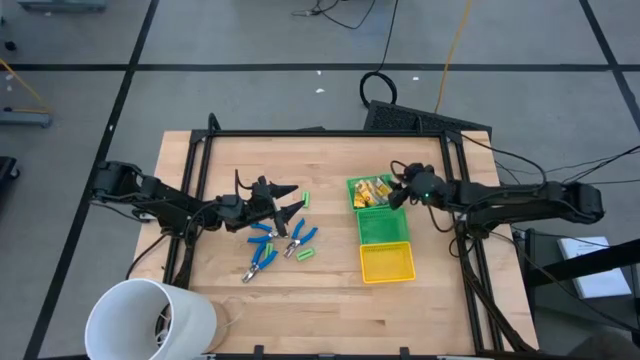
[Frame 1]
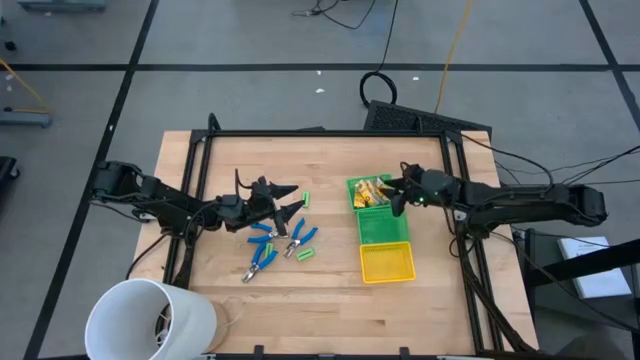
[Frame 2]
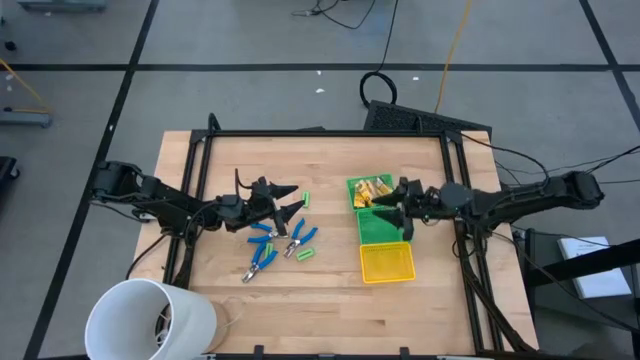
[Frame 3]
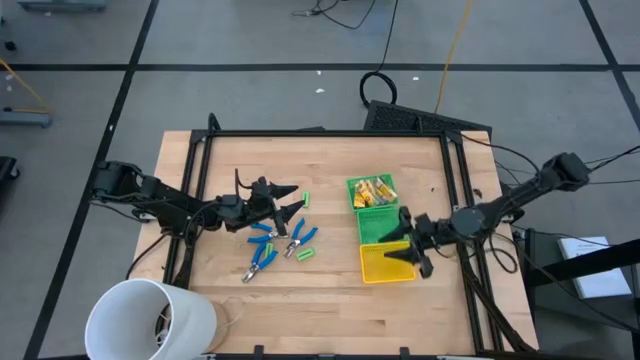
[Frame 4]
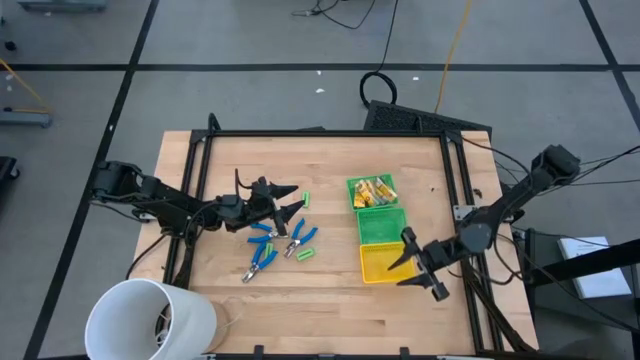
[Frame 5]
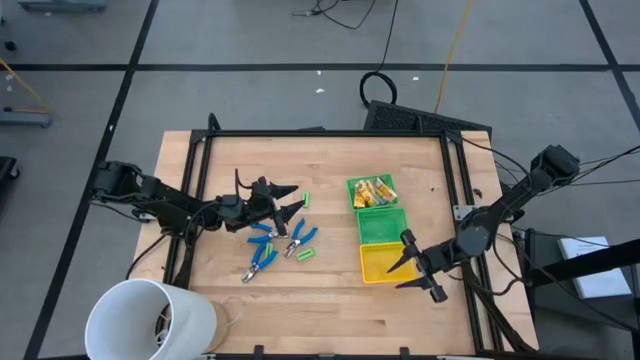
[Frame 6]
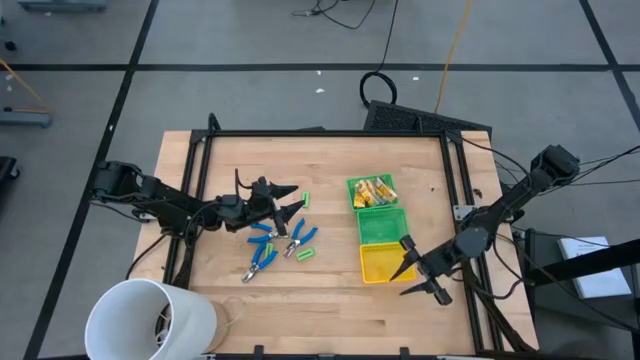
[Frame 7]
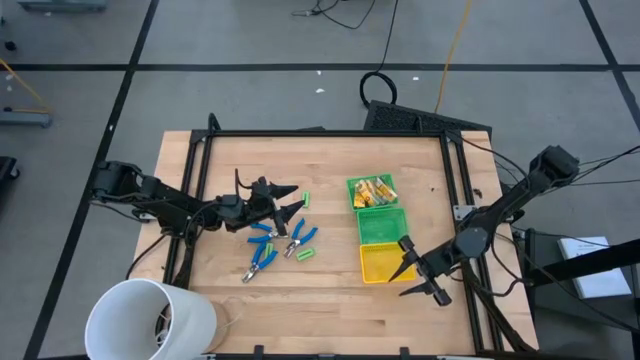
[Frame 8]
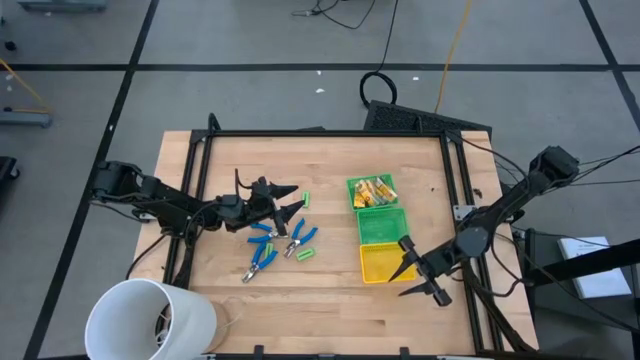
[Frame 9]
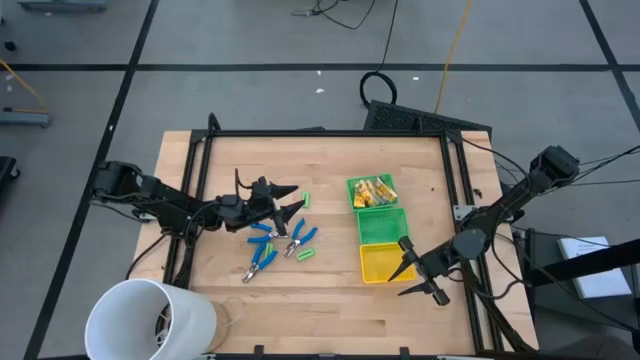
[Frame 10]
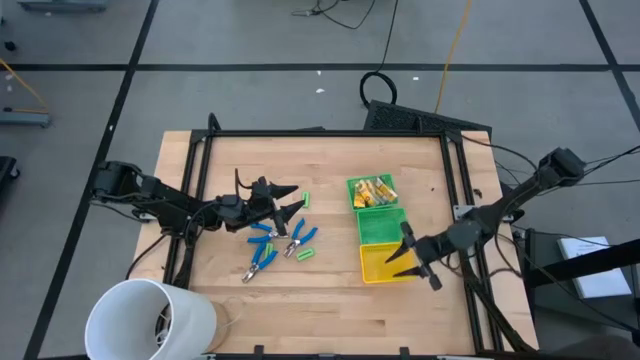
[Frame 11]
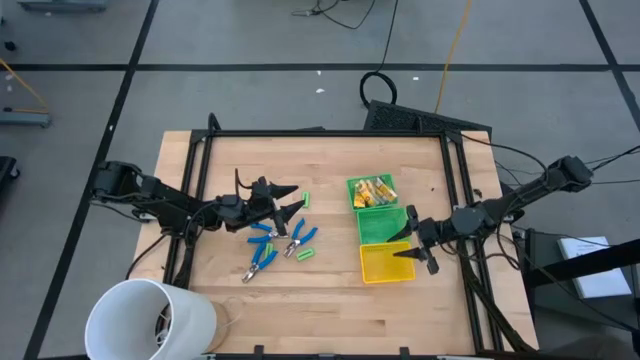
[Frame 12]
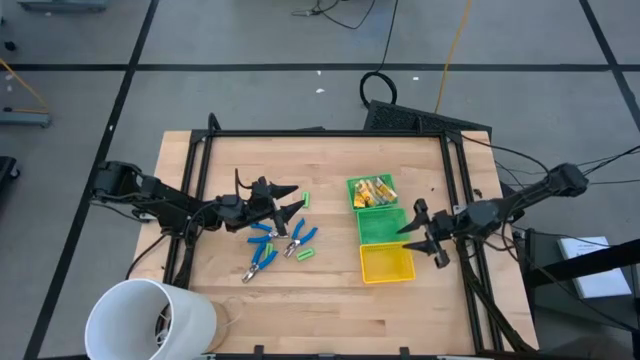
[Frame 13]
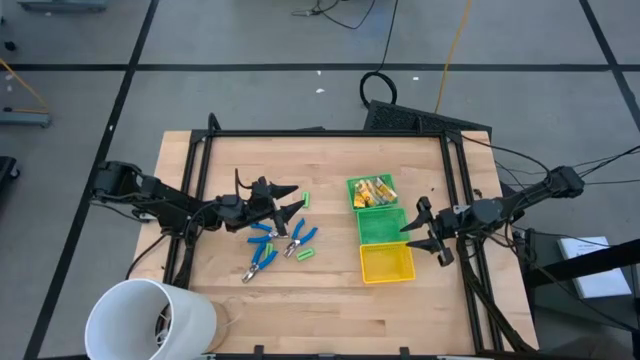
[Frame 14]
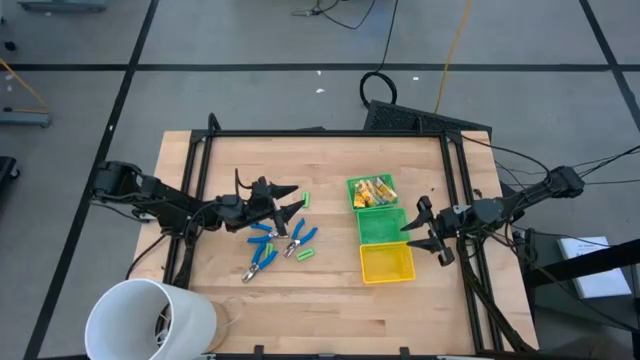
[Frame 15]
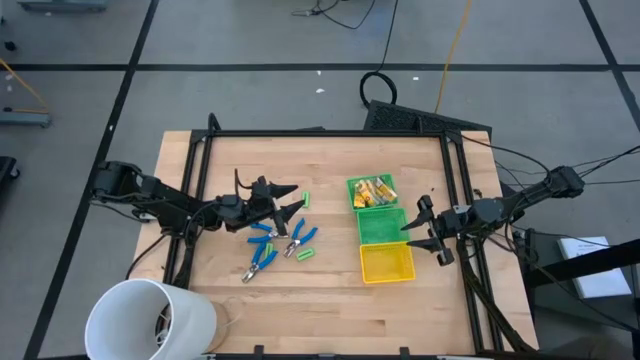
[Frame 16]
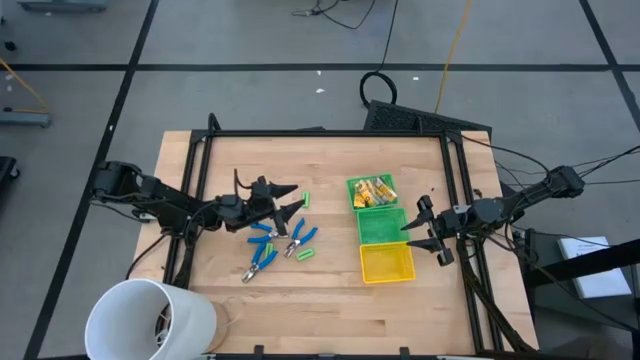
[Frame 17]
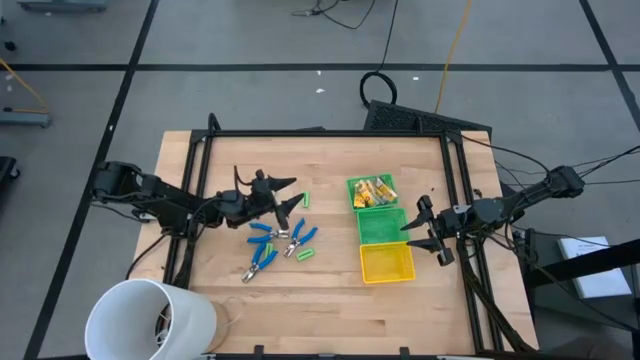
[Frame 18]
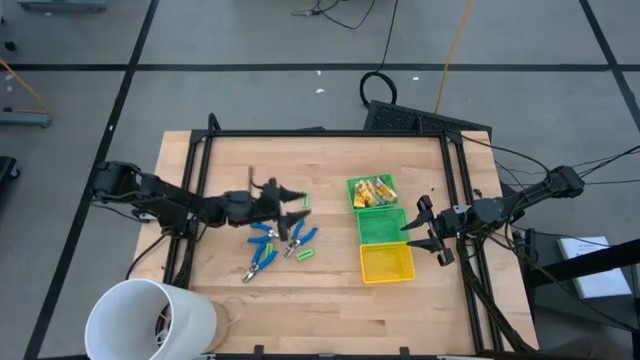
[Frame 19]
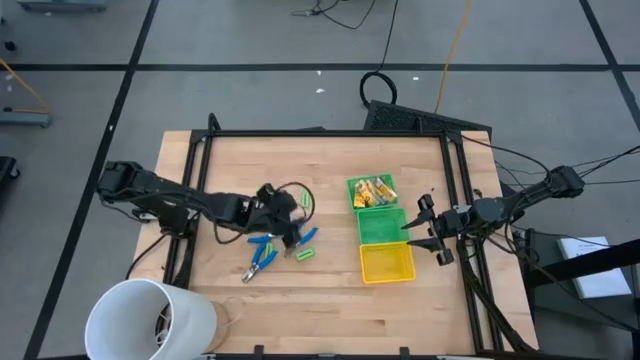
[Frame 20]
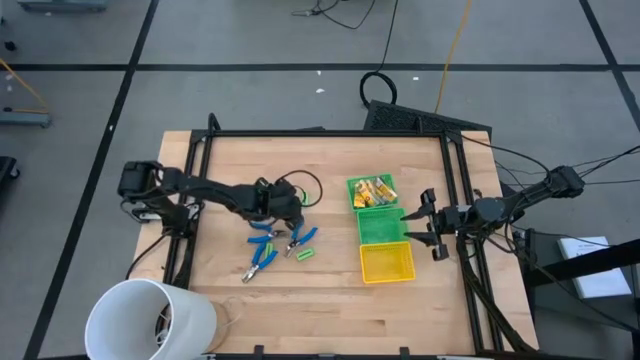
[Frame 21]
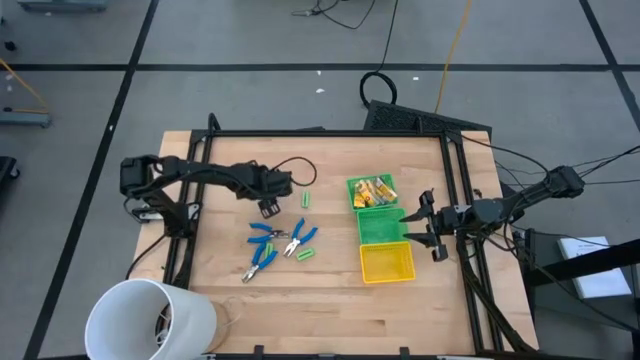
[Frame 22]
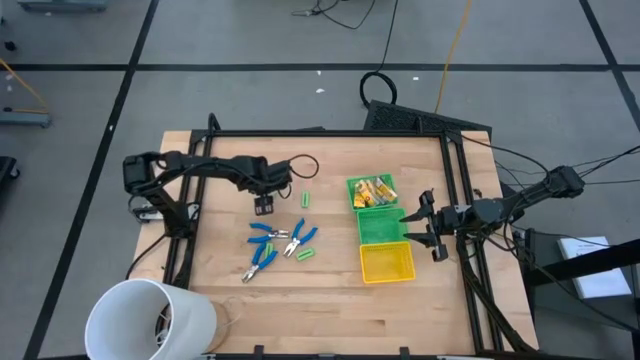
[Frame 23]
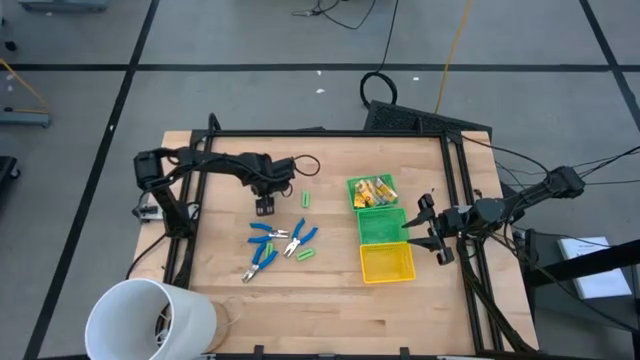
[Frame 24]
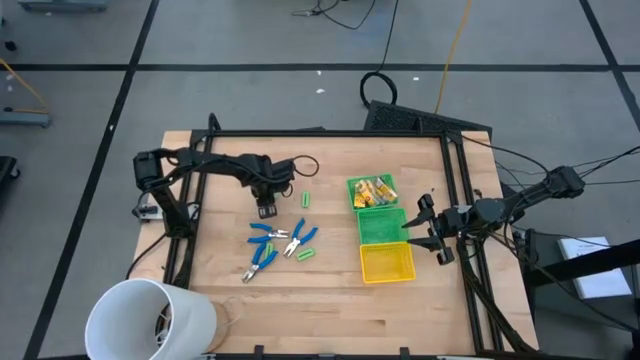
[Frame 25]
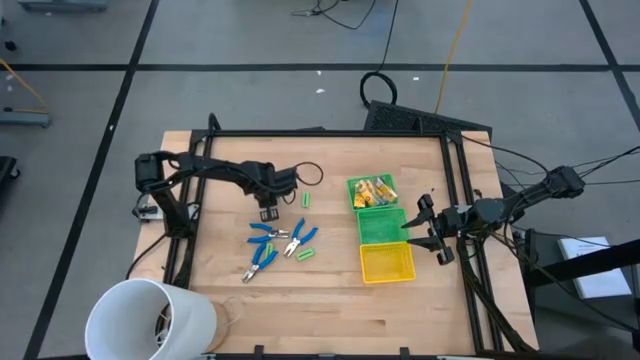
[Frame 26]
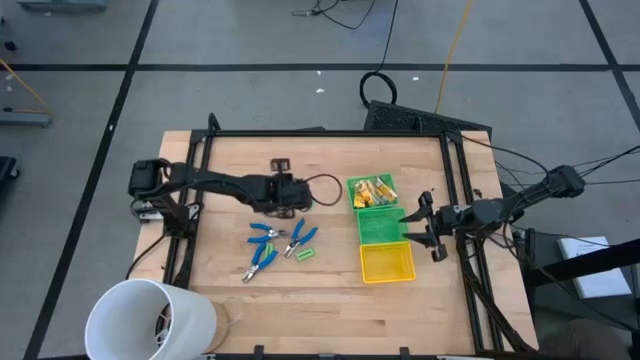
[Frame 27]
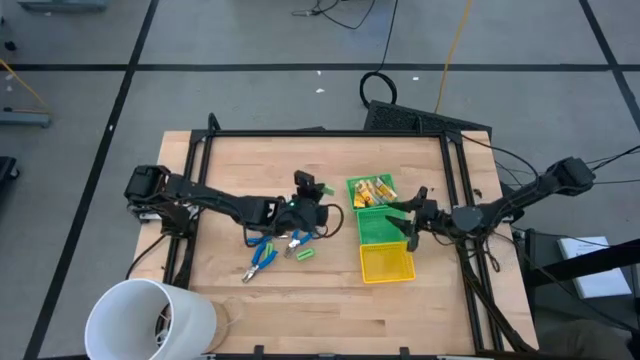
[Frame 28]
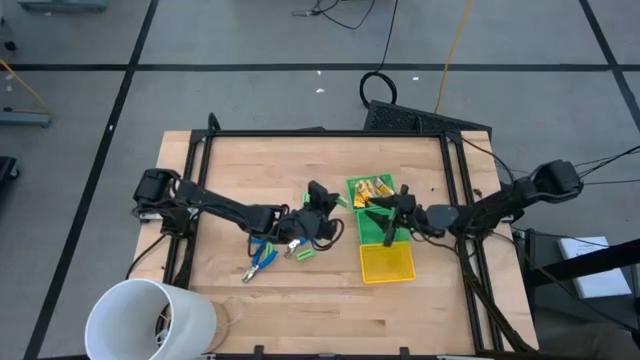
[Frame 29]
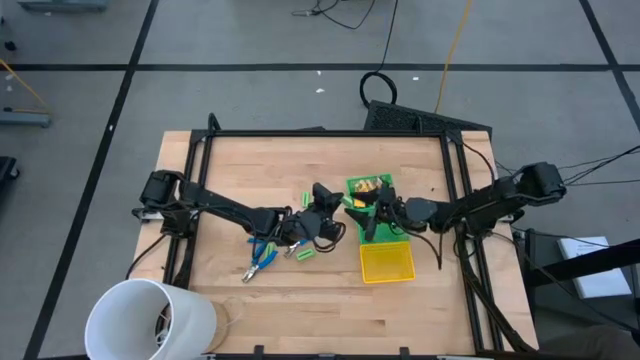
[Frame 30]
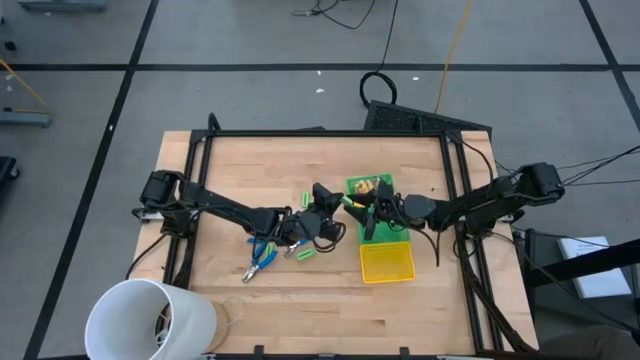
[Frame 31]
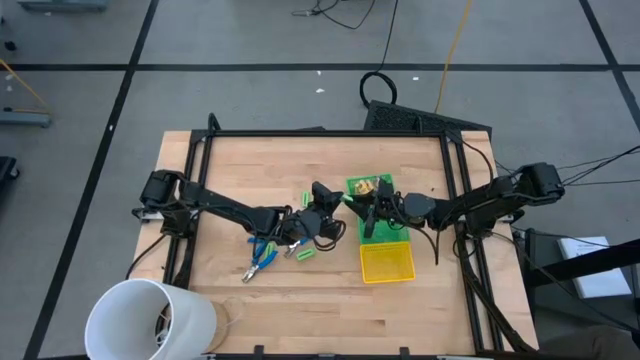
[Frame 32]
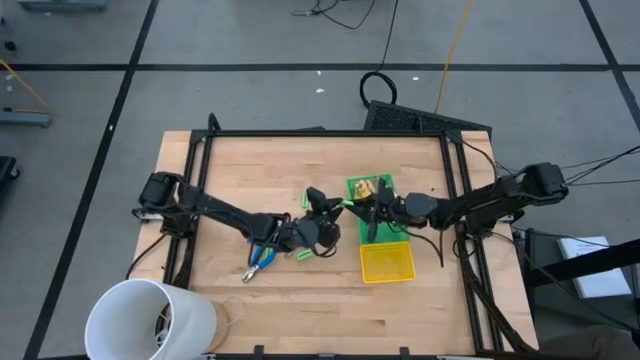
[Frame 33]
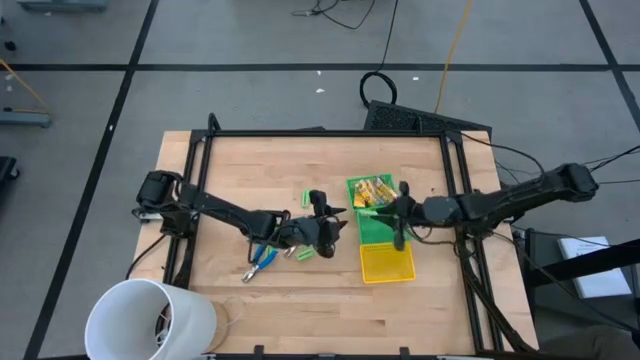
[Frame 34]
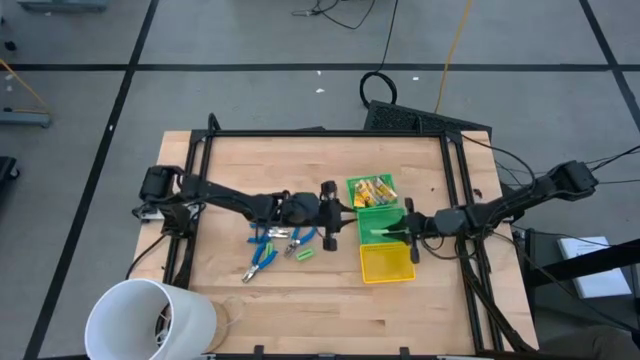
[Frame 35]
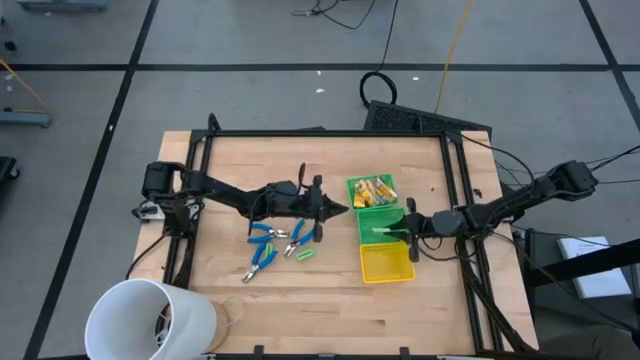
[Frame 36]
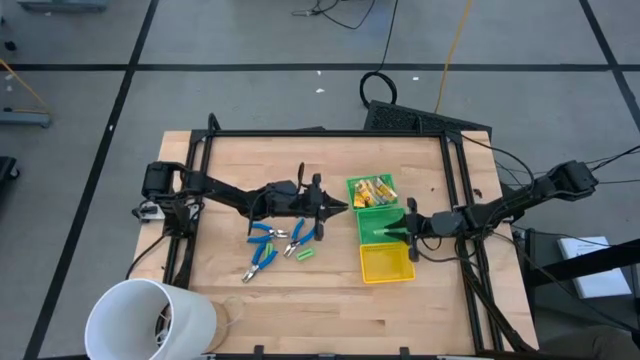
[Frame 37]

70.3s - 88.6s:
Task: Pick & Place School Supplies
Put the top left green eraser into the bottom green bin

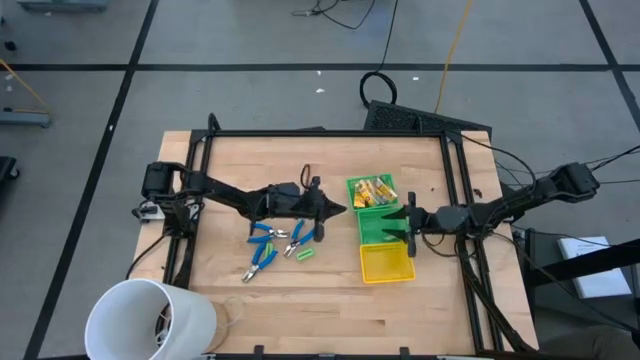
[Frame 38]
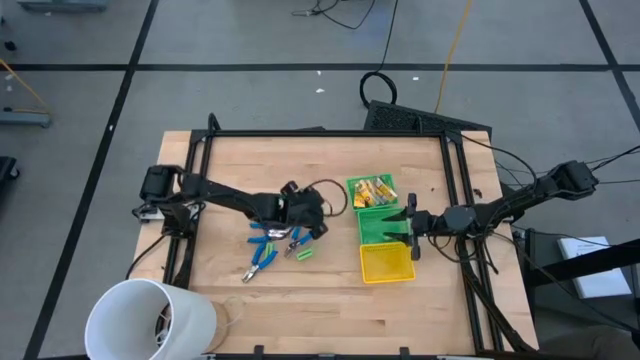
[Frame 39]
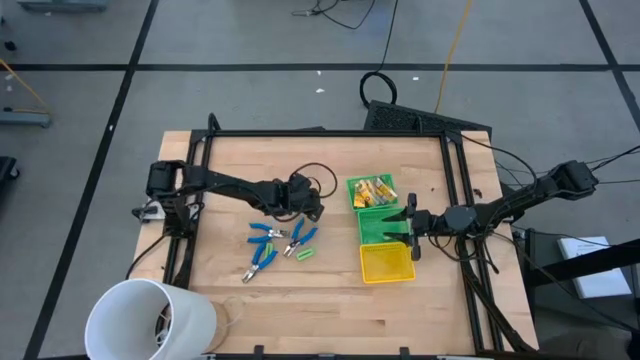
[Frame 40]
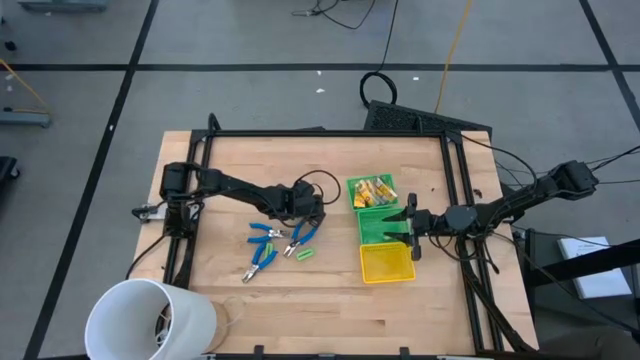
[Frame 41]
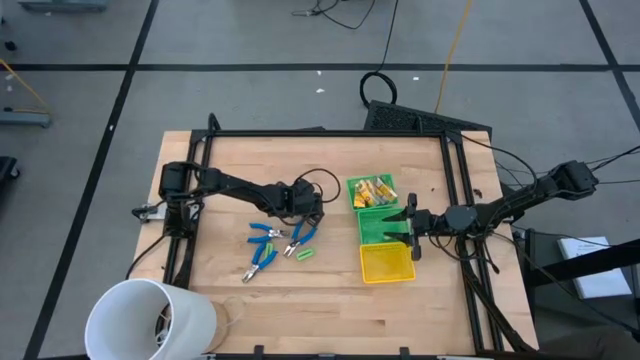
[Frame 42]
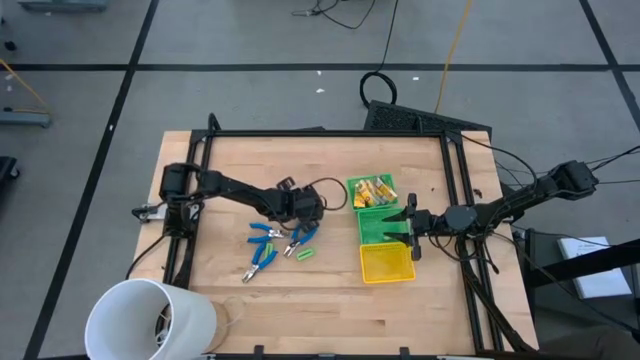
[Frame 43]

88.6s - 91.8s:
Put the green eraser into the bottom green bin
